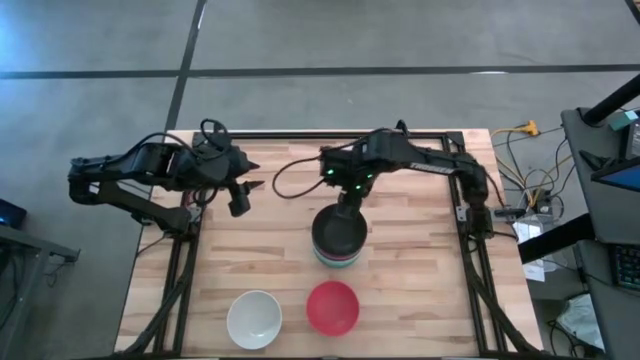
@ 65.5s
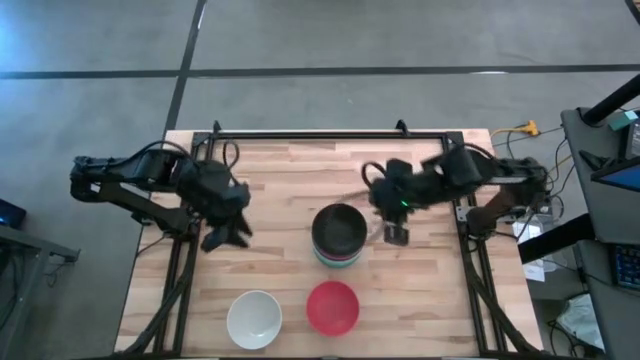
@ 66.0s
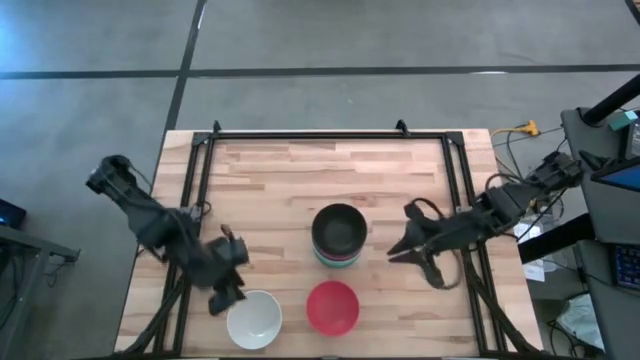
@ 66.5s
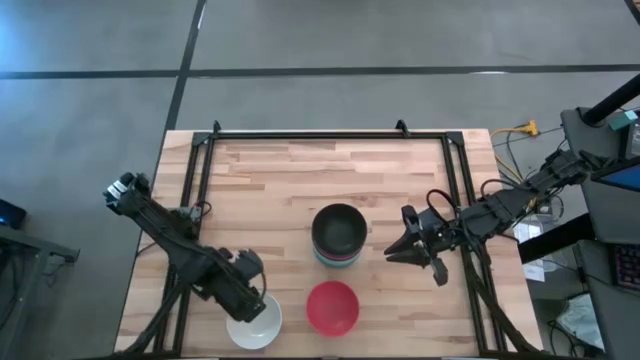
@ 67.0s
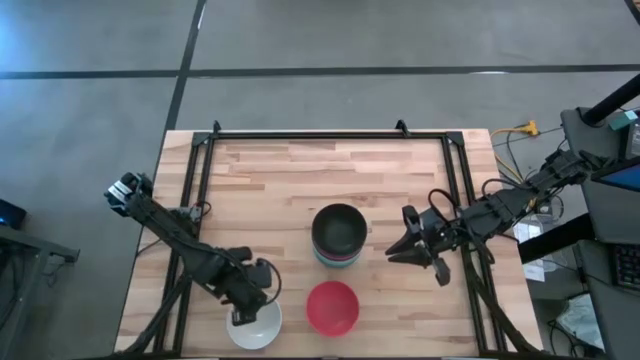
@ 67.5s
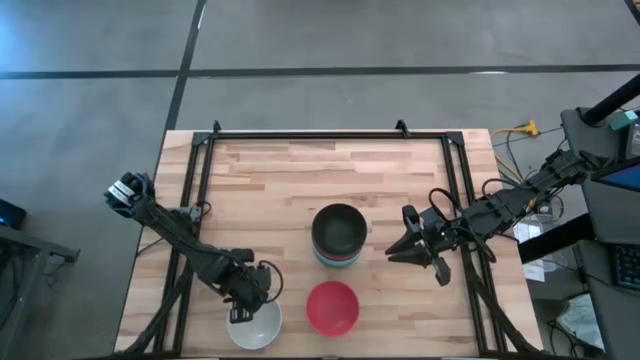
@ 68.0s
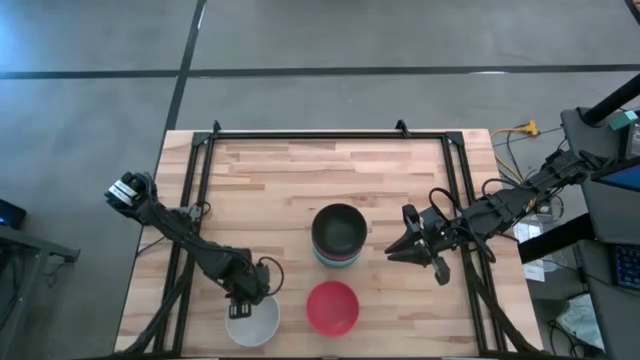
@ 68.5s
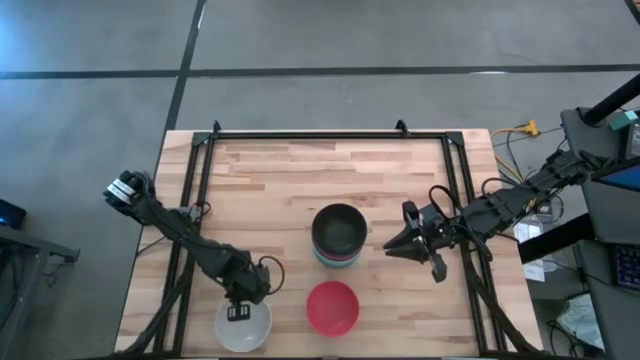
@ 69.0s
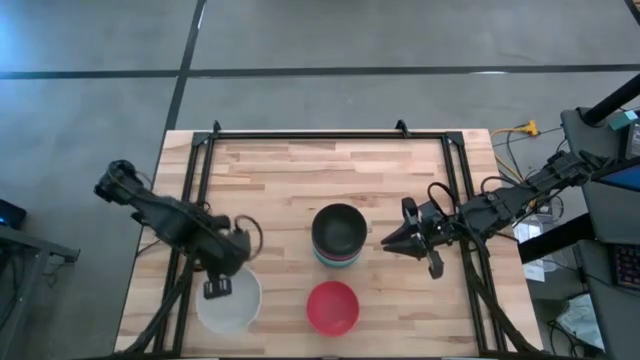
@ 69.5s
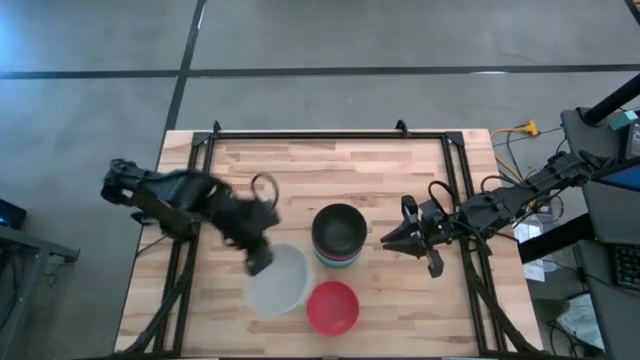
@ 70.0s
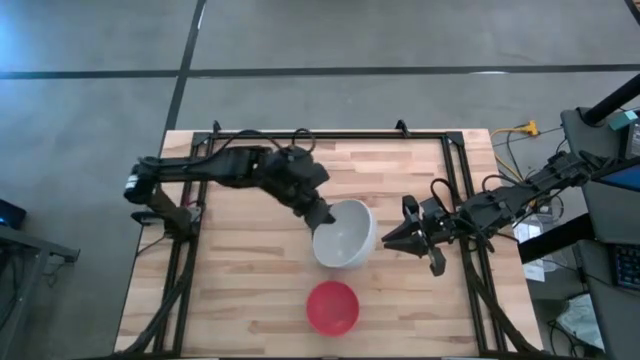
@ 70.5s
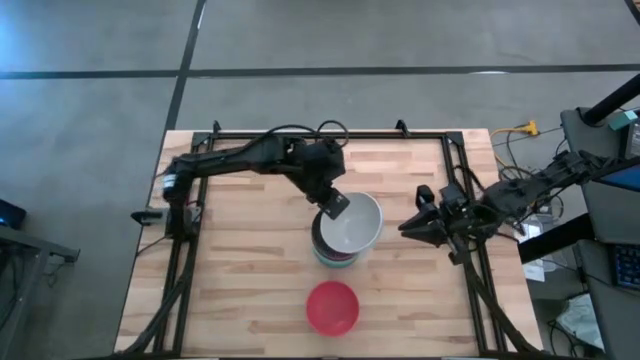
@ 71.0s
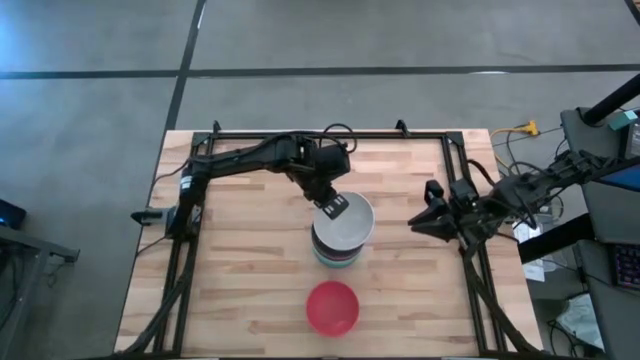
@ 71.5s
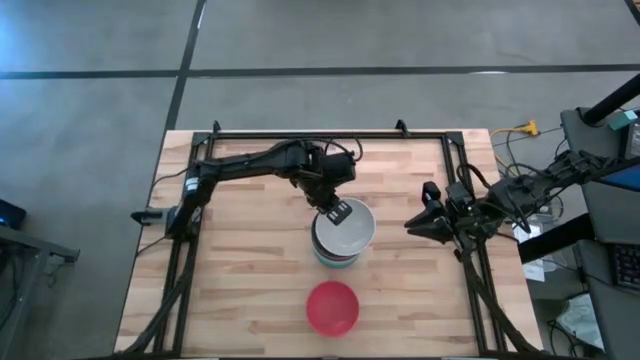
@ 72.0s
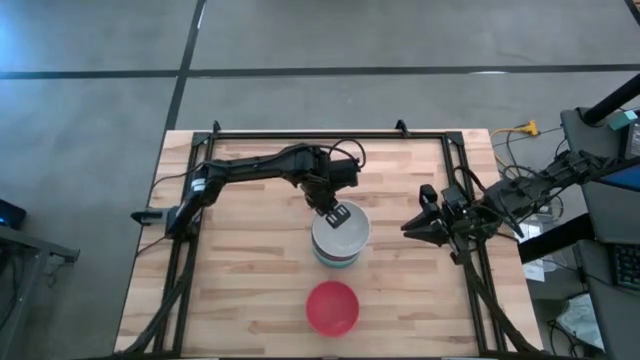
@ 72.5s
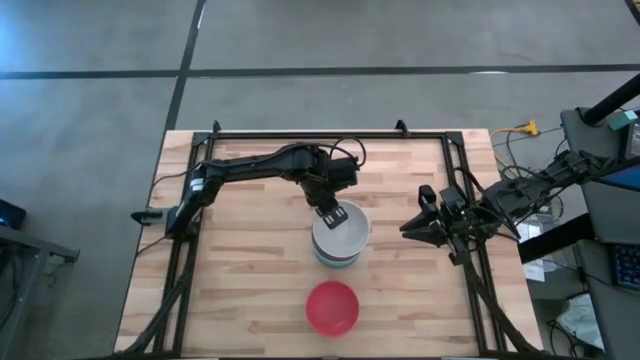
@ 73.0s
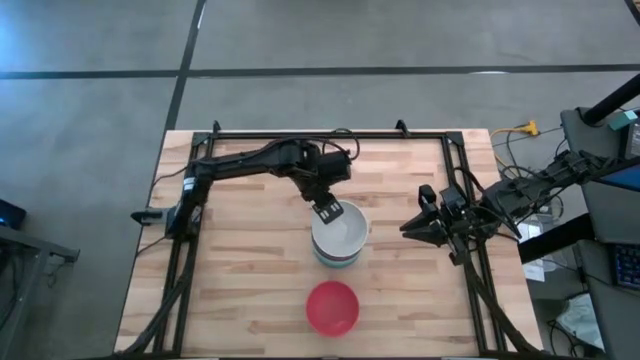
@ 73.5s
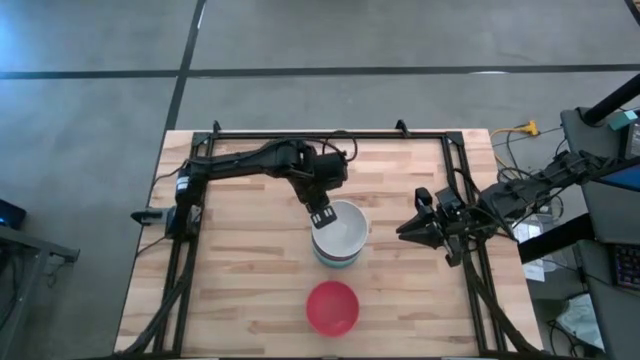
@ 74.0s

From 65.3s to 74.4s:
Task: Nest bowls inside each other
Stack the white bowl on top of the black bowl

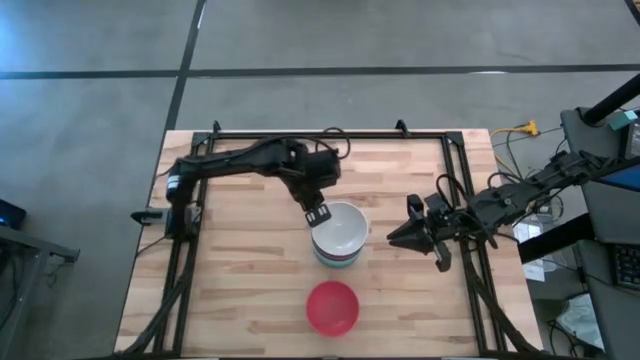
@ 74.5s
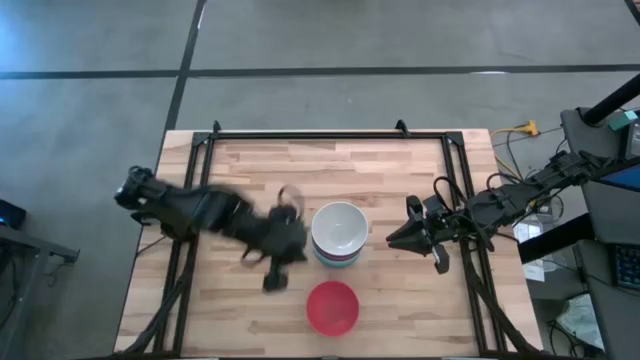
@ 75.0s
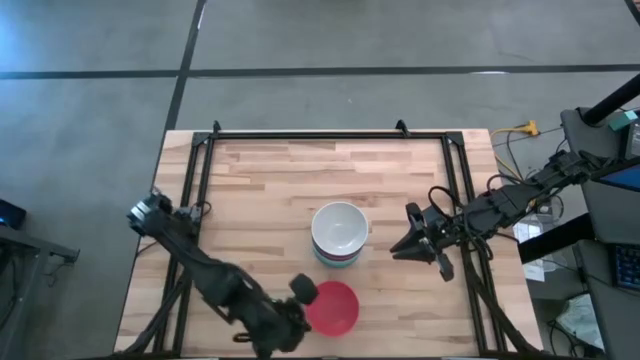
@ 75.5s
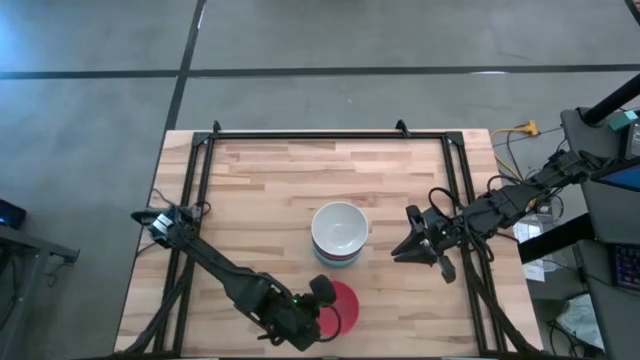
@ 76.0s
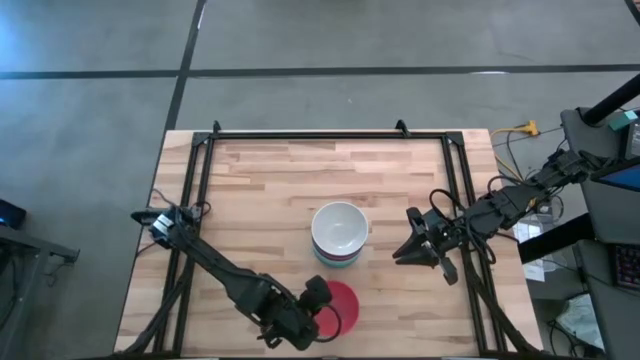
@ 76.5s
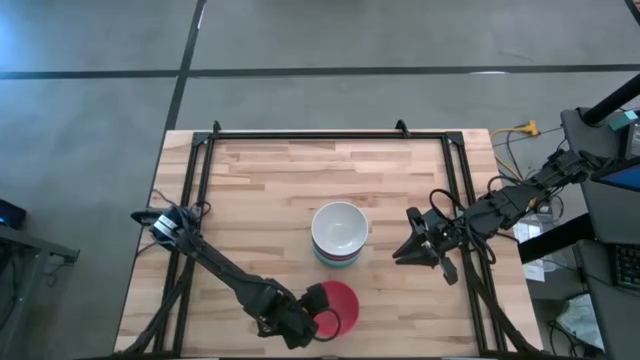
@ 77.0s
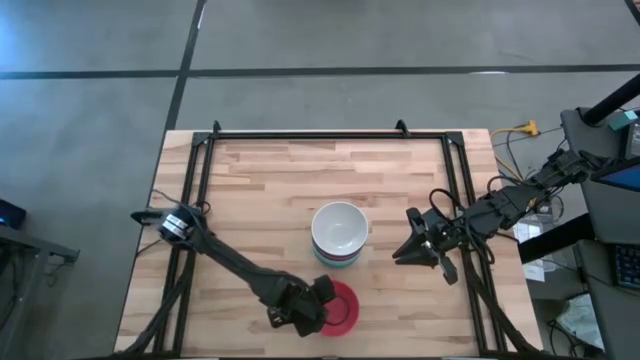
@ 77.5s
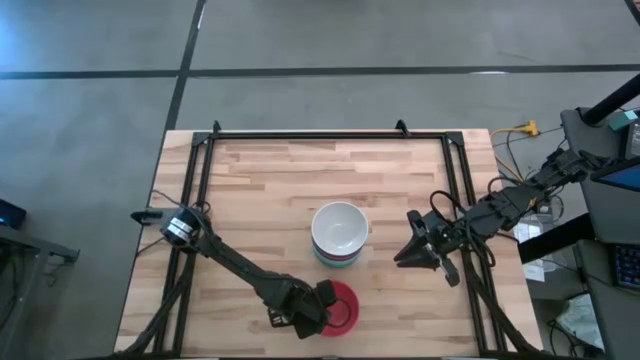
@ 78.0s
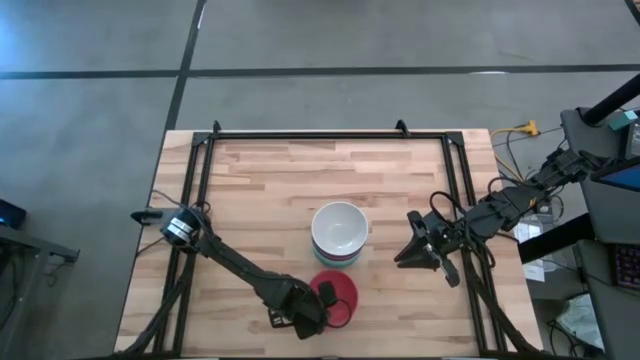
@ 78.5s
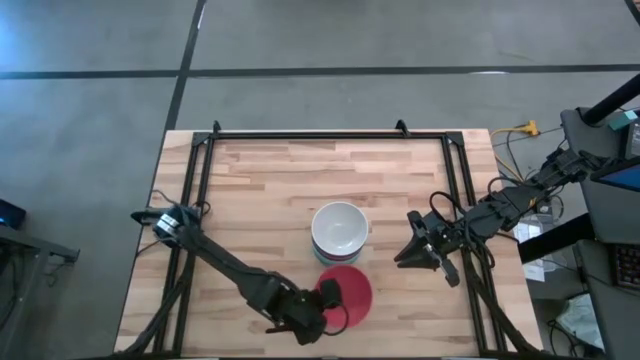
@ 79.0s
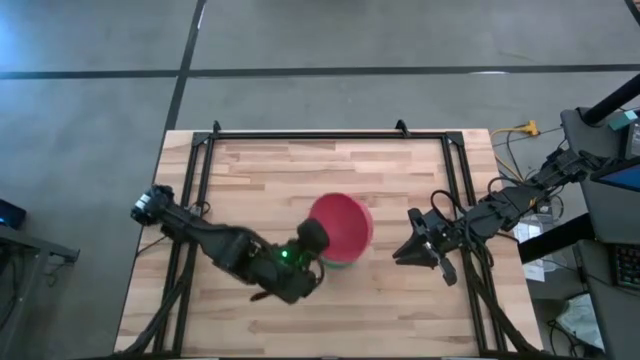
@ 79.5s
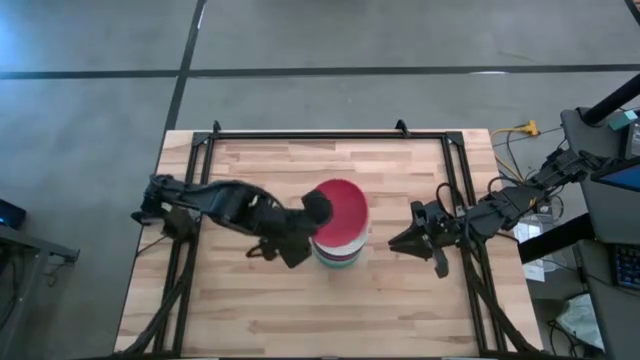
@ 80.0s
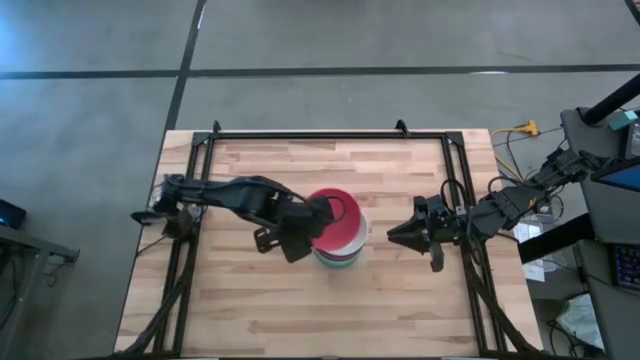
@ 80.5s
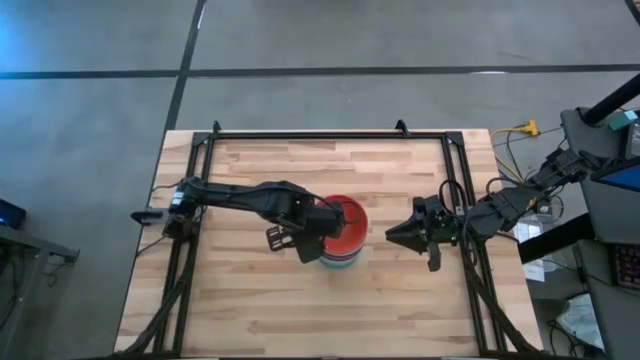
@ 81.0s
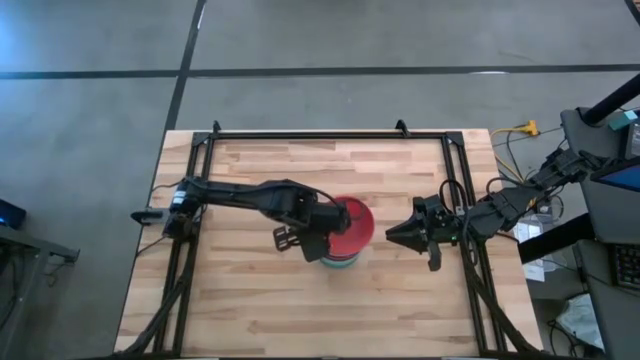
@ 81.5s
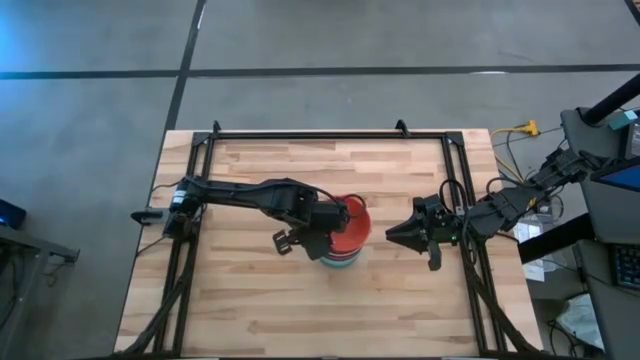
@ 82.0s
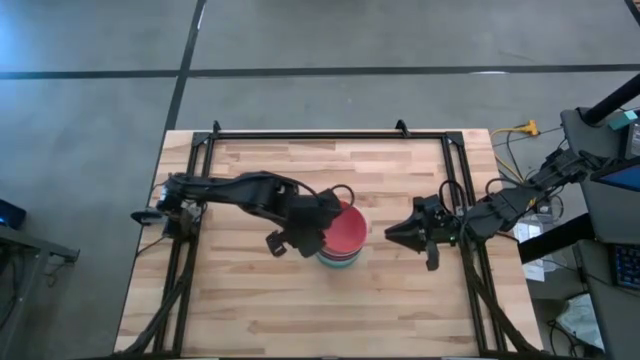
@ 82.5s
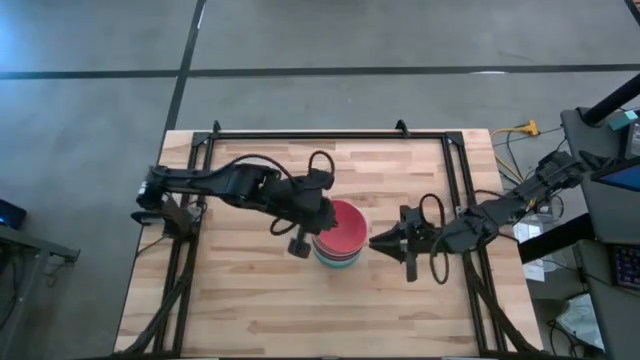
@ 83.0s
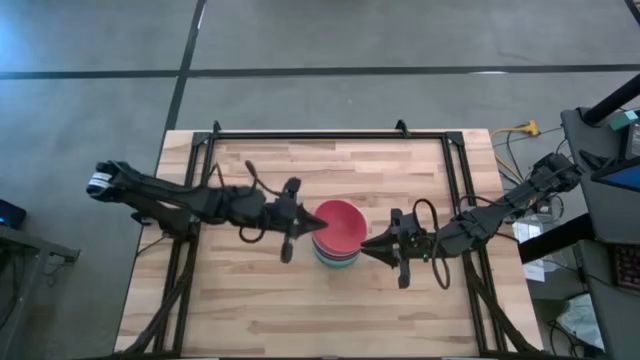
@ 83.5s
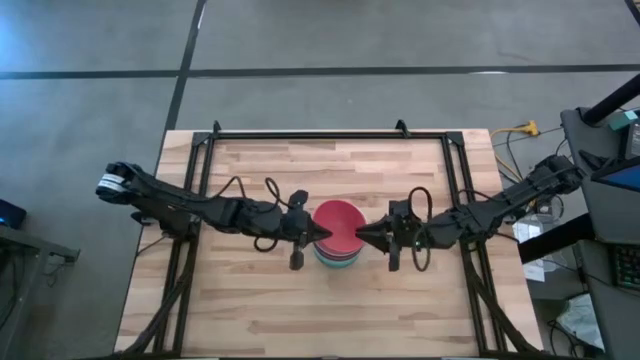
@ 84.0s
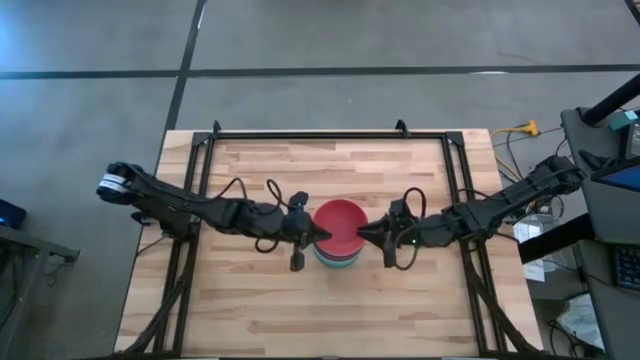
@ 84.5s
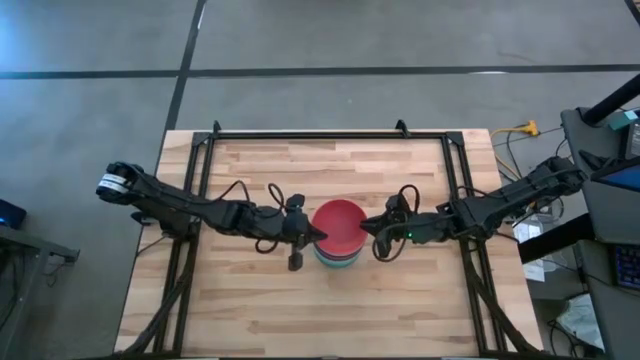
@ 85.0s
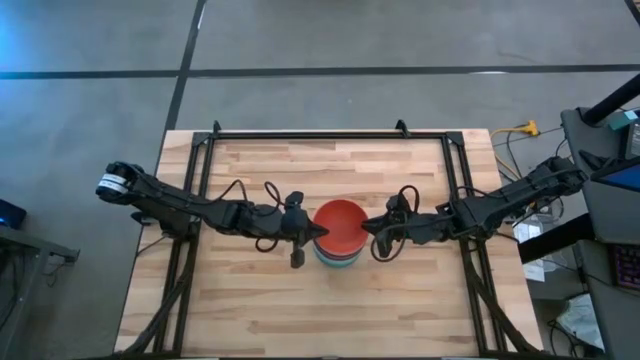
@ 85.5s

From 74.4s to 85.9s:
Stack the orange bowl on top of the white bowl

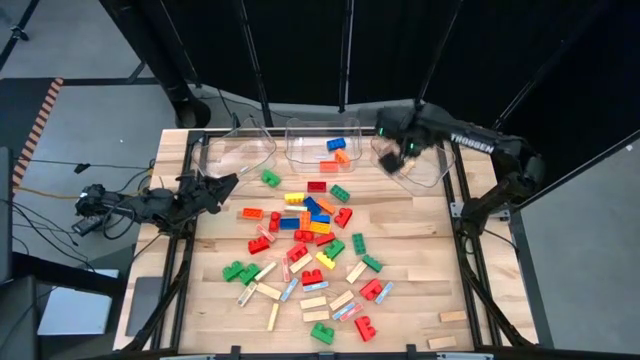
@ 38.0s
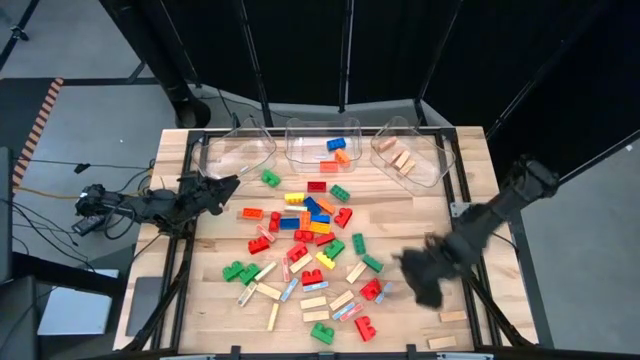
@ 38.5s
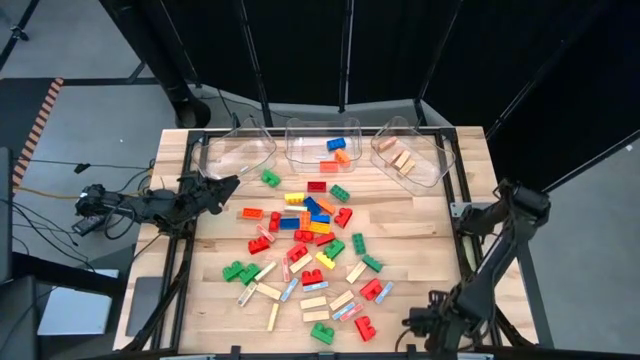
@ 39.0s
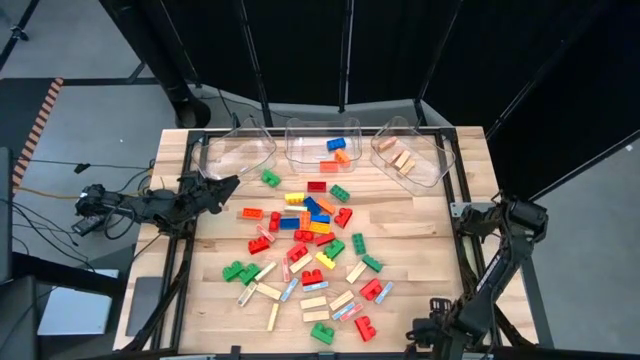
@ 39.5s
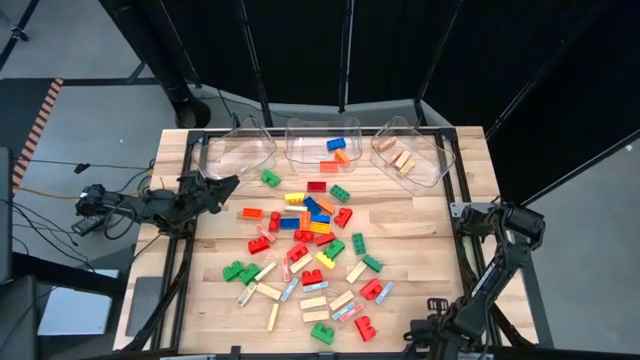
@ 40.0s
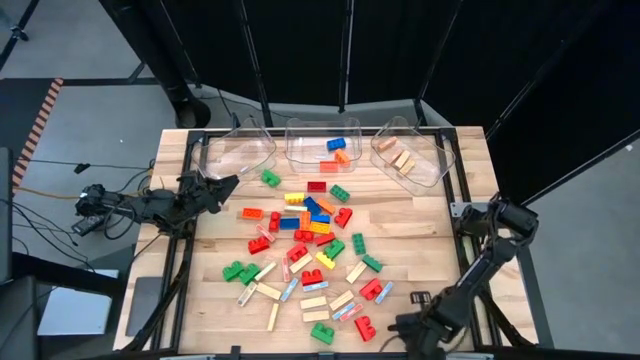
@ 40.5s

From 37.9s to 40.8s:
Task: Sort blocks by size
Put the brown wooden block into the right transparent bin
